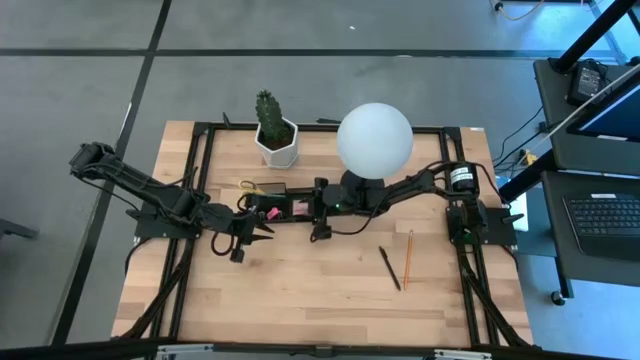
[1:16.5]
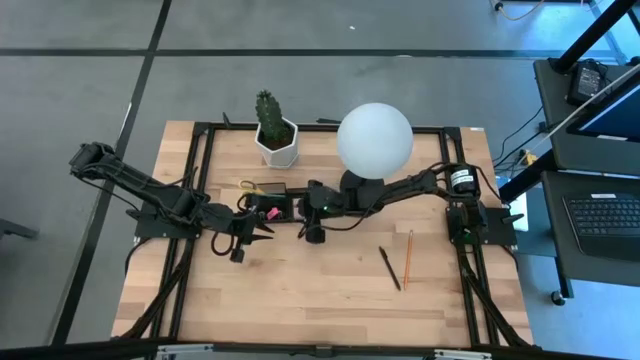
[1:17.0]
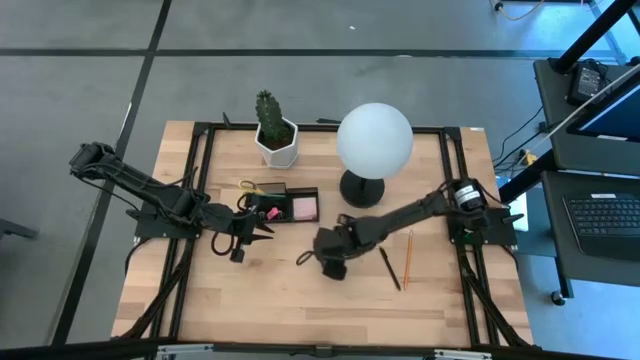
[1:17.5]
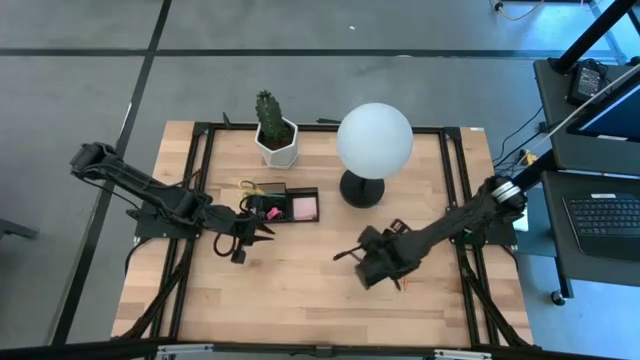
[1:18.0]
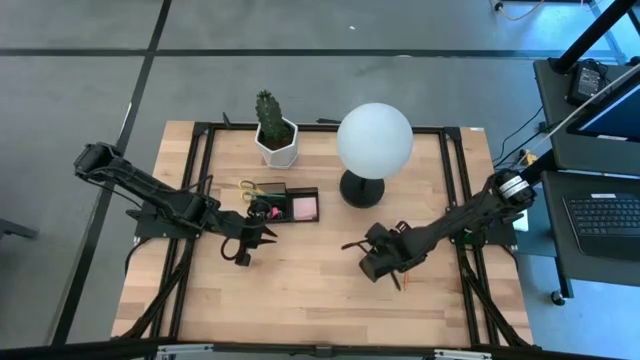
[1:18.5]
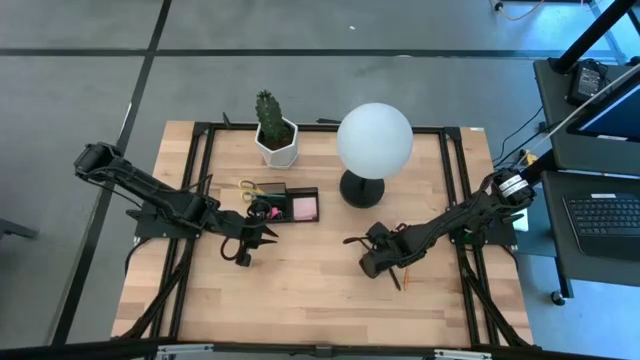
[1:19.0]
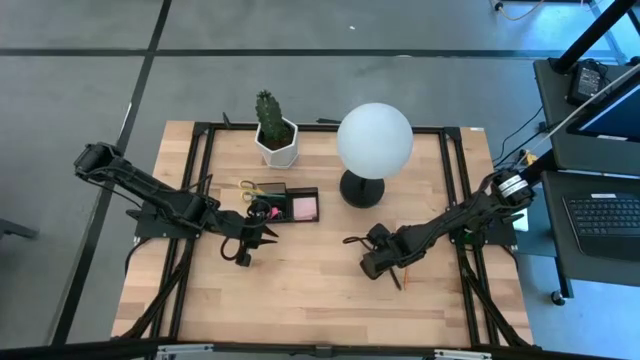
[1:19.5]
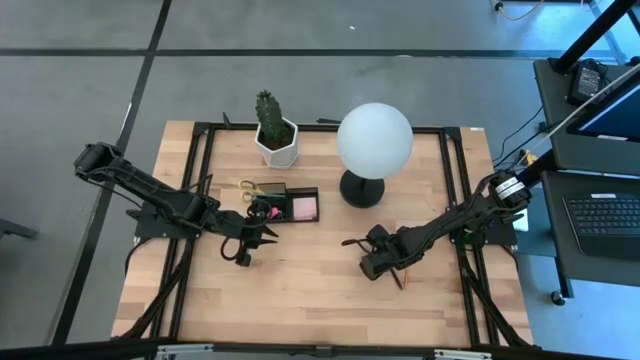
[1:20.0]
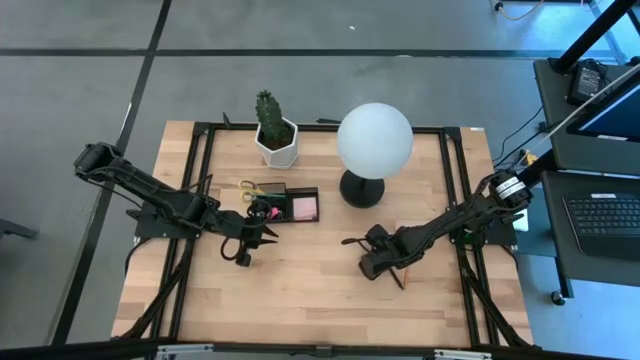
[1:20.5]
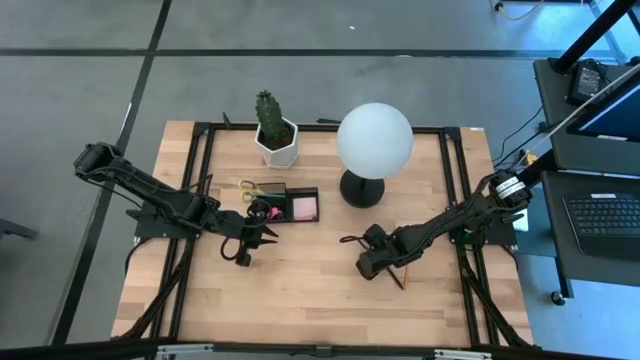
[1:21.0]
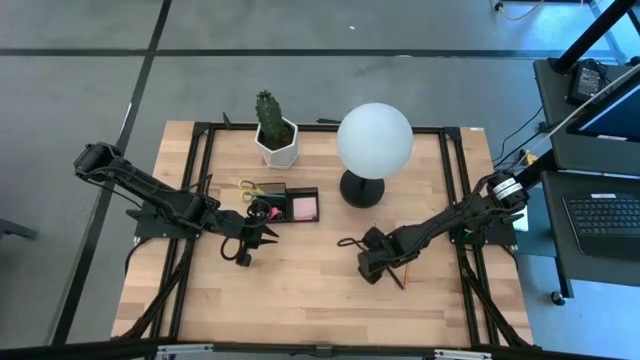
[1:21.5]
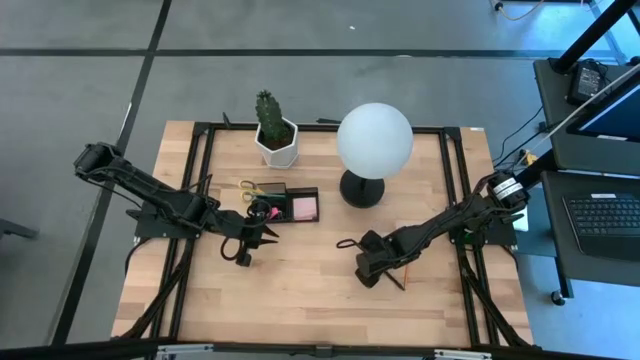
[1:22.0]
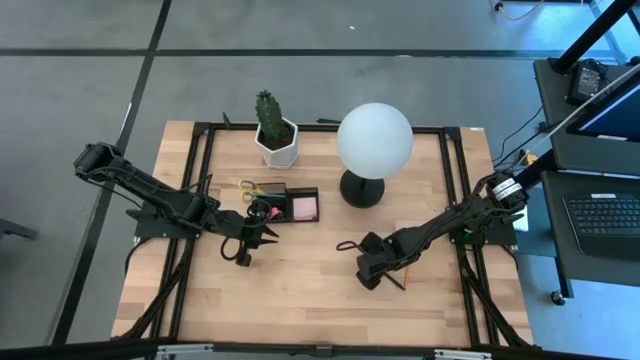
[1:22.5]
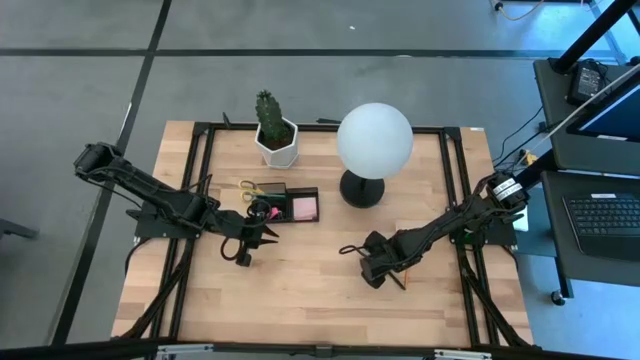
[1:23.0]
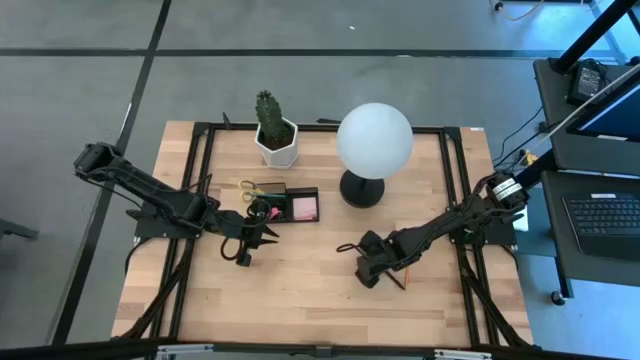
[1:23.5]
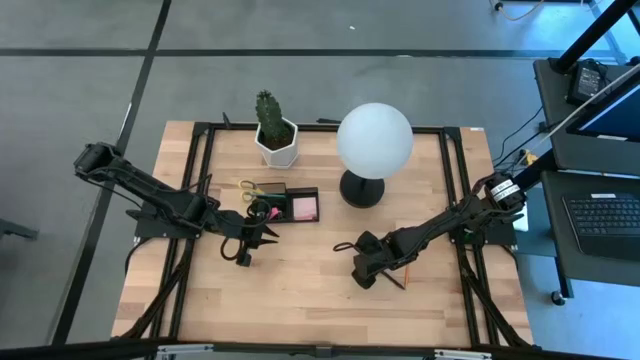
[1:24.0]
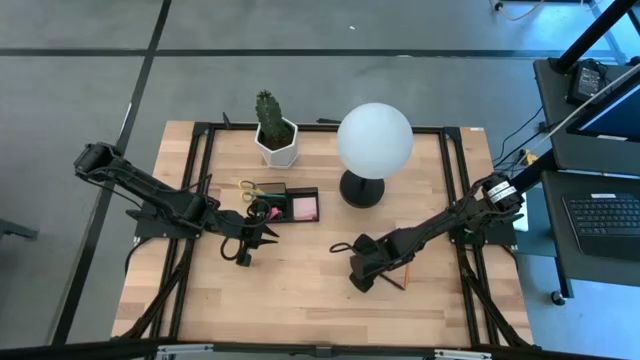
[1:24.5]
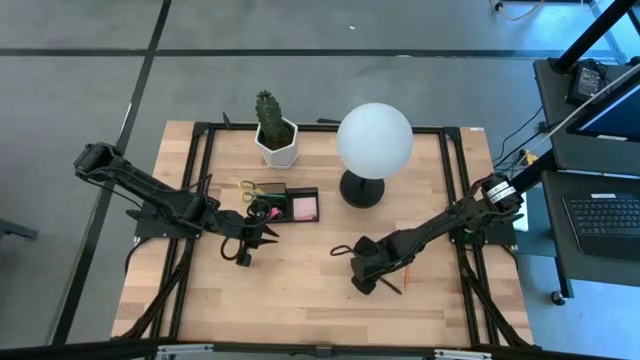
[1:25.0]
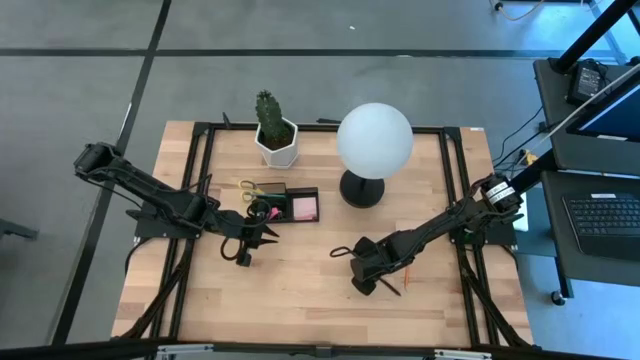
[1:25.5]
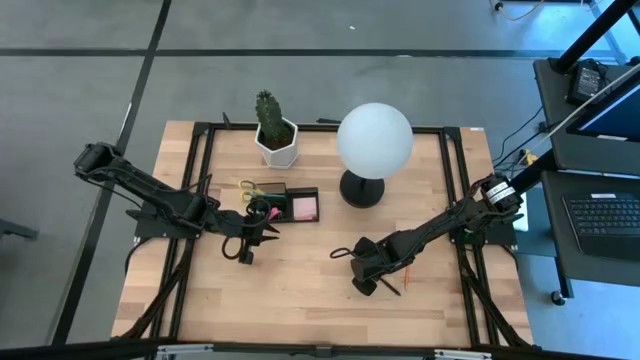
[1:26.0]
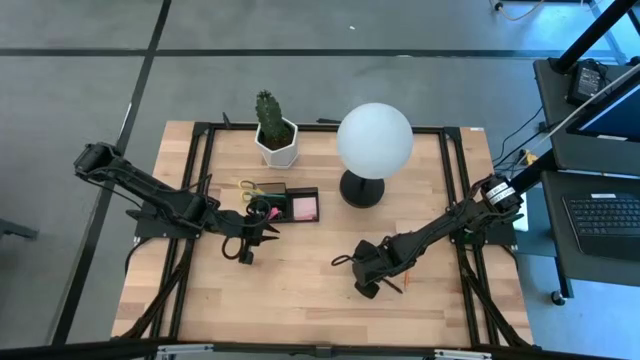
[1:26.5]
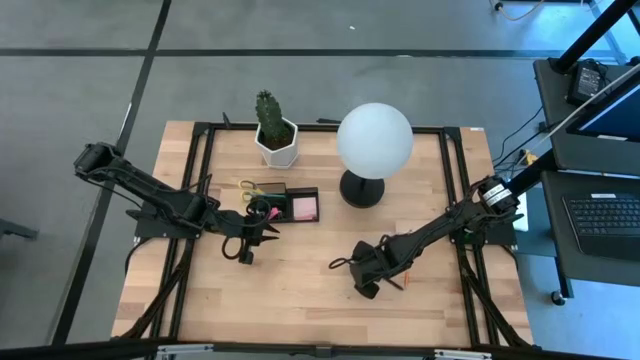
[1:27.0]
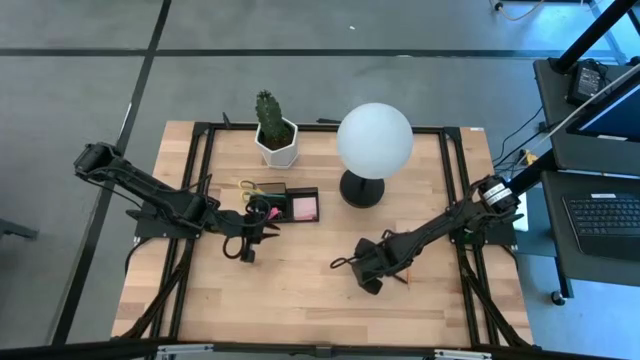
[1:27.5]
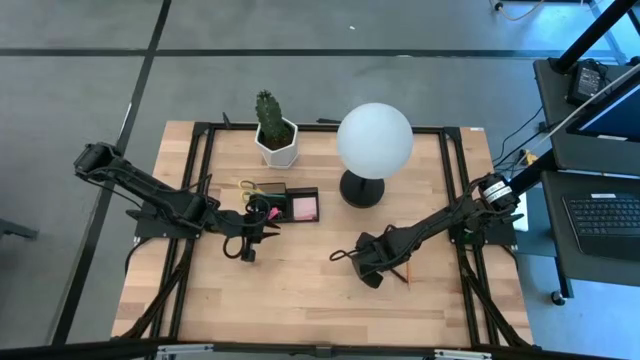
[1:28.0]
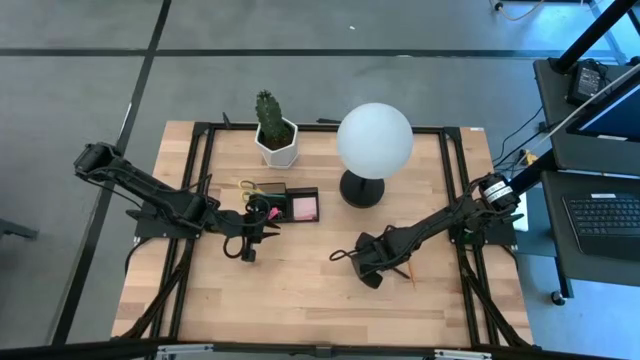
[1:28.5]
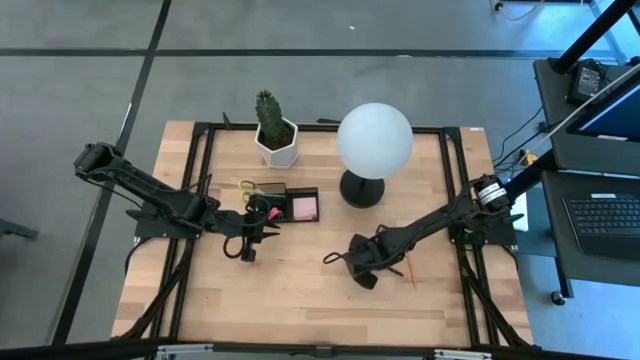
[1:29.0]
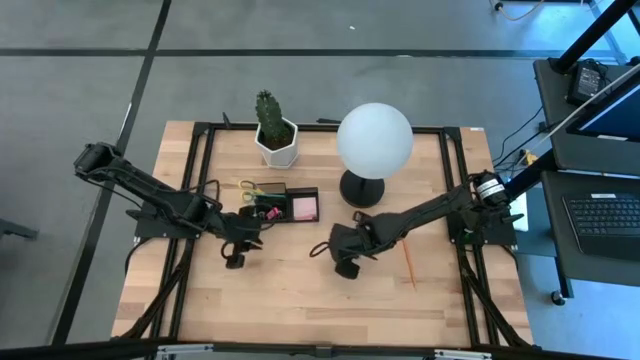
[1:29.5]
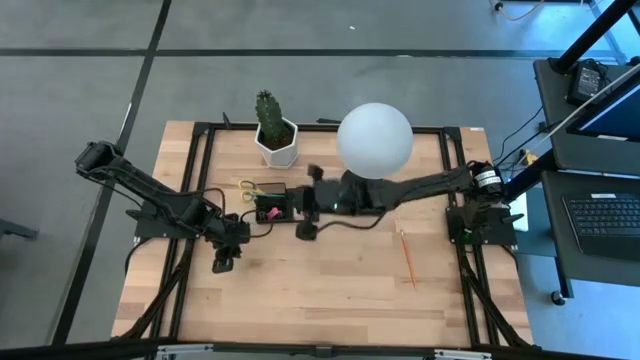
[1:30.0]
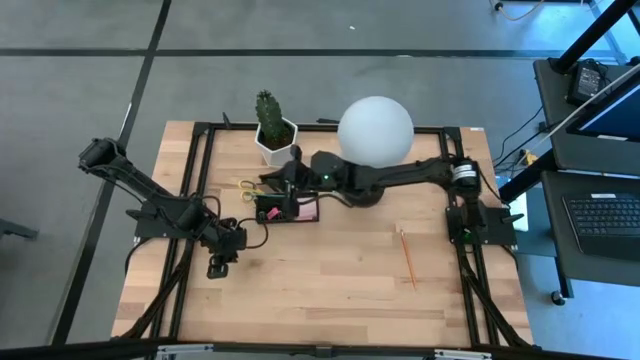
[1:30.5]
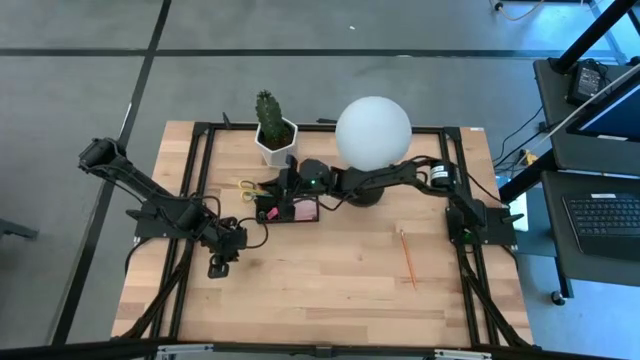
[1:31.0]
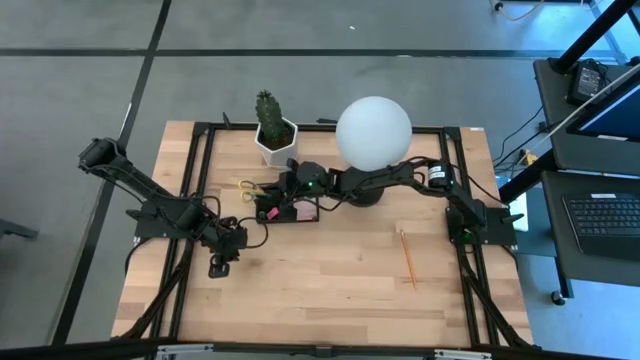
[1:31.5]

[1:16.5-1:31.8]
Task: Pick and place office supplies into organizer
Put the black pen into the black desk organizer

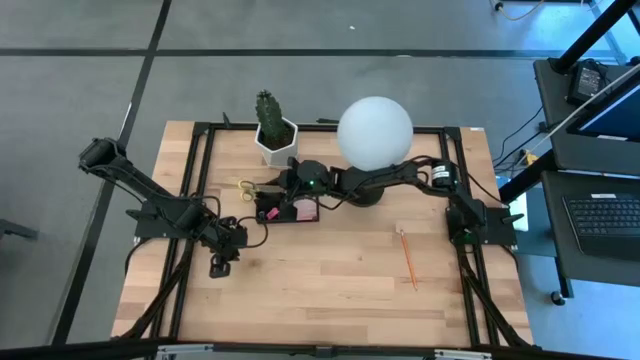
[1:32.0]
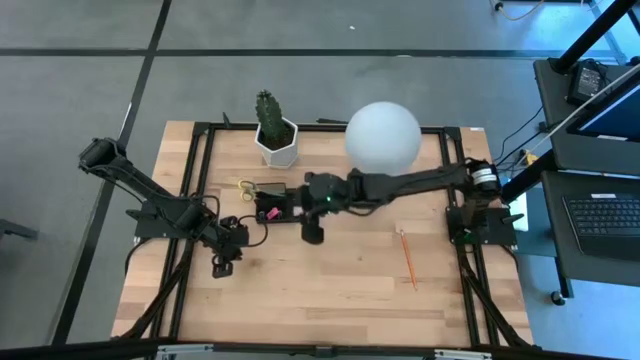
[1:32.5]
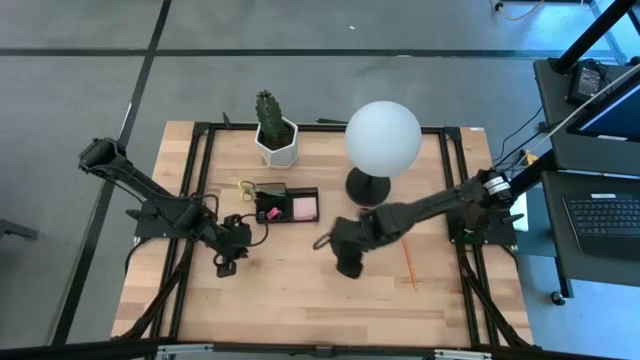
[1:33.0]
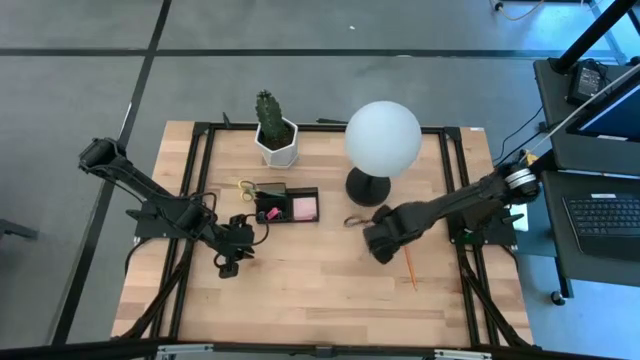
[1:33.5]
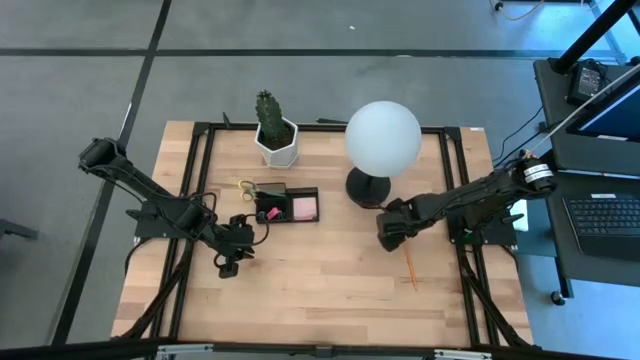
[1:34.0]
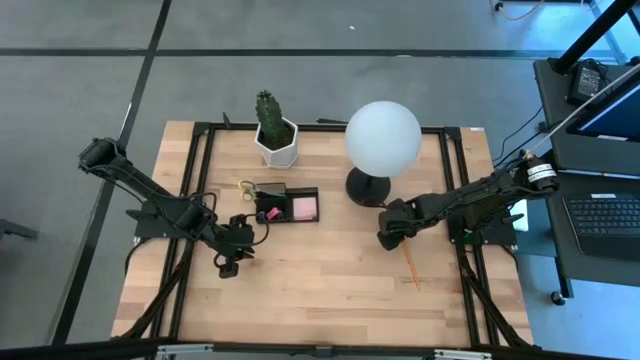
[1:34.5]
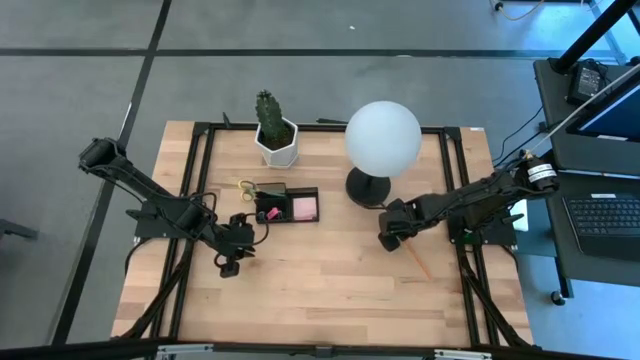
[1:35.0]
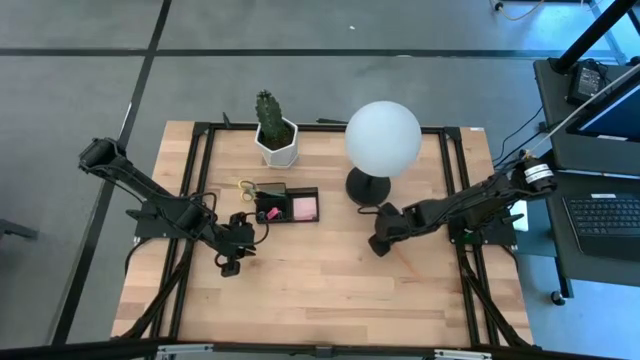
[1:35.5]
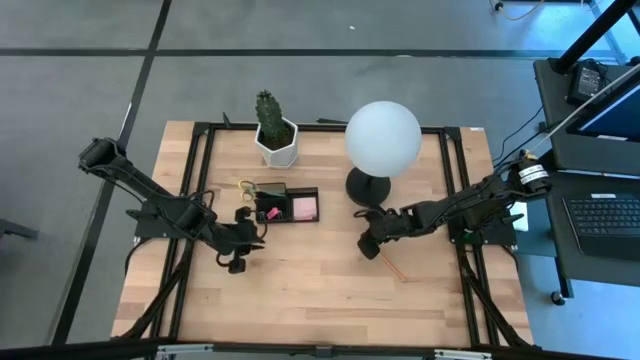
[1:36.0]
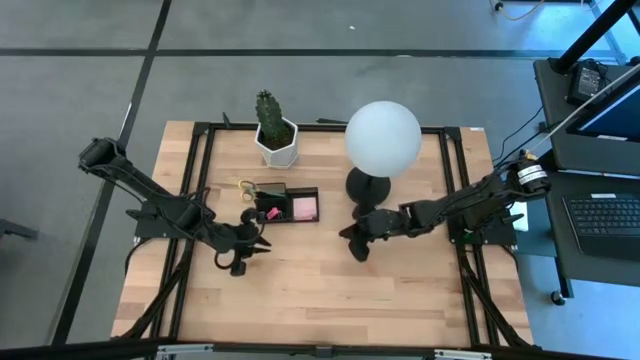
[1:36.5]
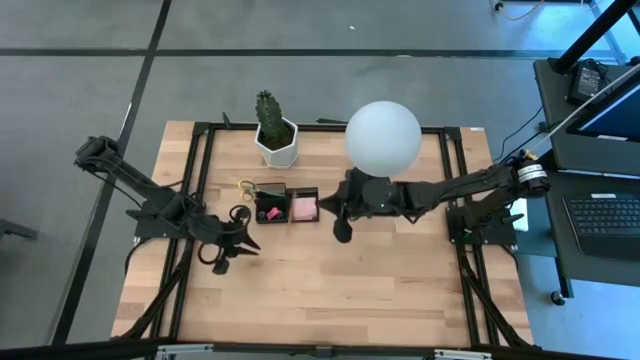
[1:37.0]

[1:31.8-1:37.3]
Put the orange pencil into the black desk organizer
